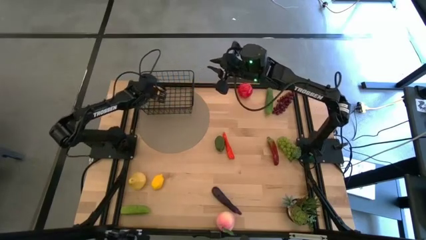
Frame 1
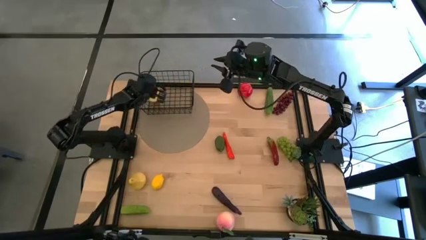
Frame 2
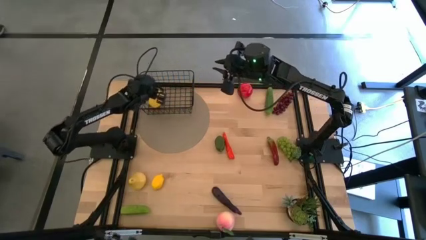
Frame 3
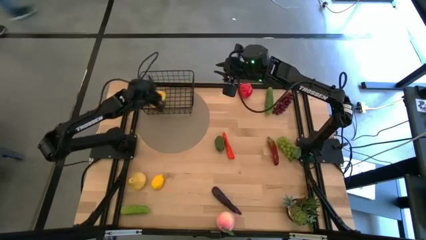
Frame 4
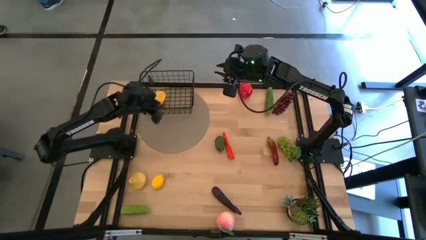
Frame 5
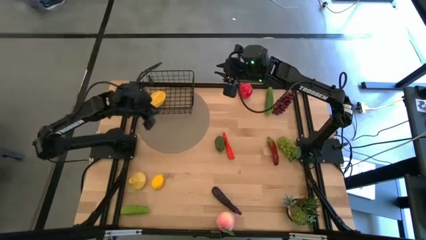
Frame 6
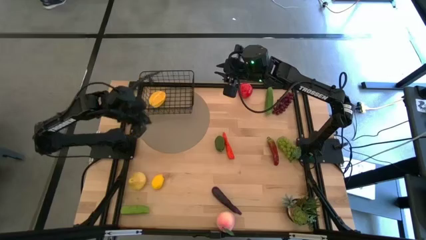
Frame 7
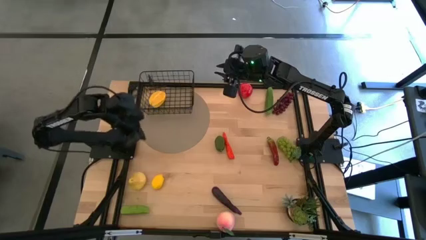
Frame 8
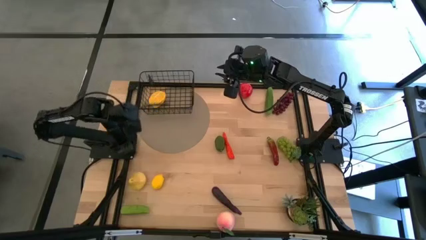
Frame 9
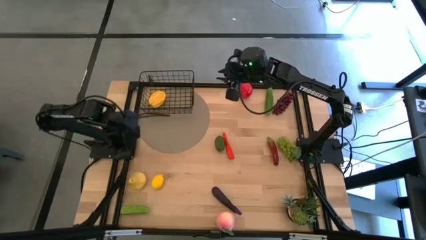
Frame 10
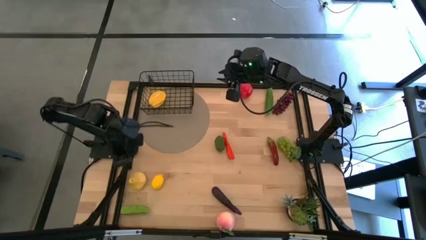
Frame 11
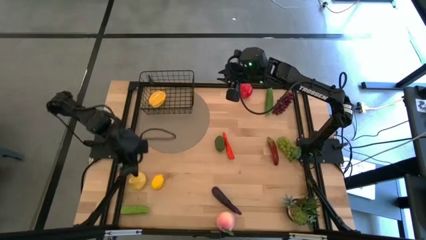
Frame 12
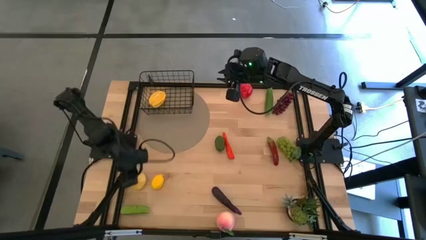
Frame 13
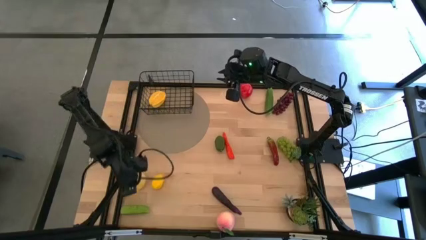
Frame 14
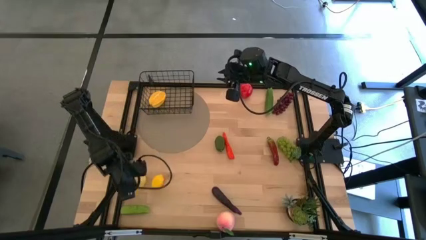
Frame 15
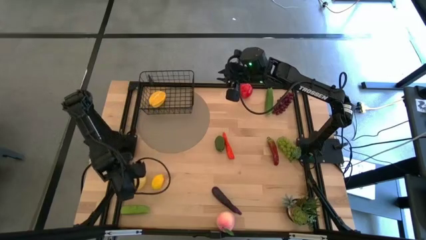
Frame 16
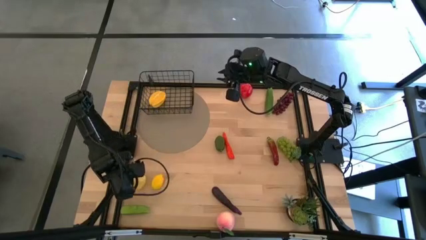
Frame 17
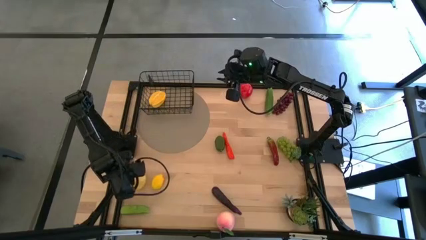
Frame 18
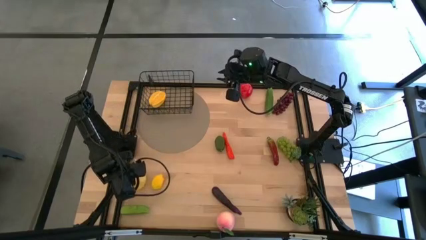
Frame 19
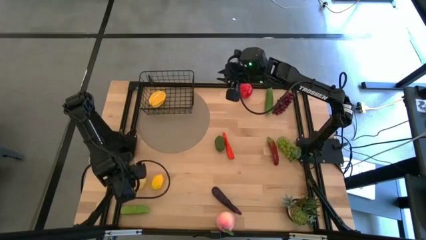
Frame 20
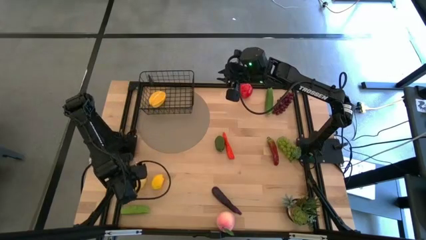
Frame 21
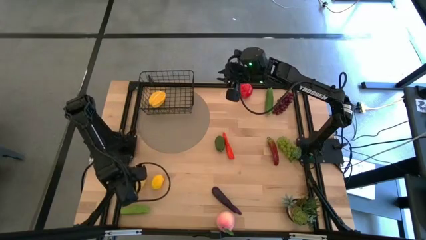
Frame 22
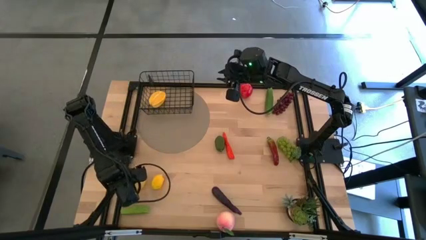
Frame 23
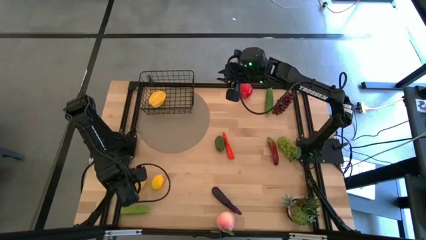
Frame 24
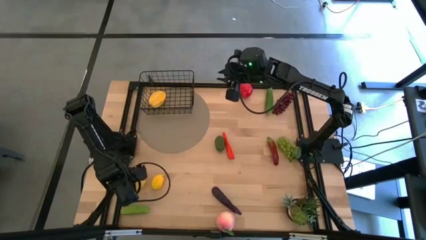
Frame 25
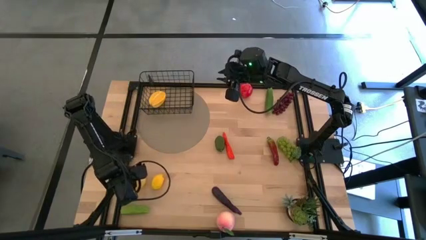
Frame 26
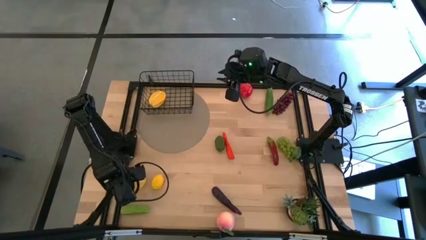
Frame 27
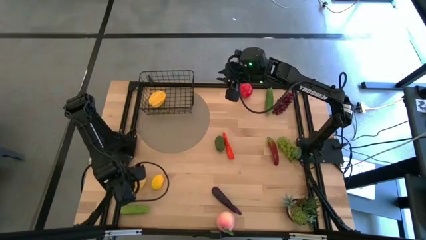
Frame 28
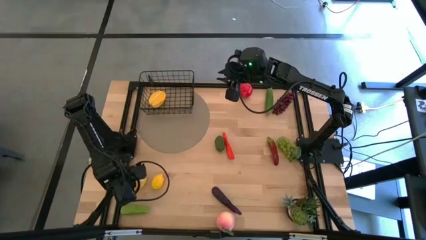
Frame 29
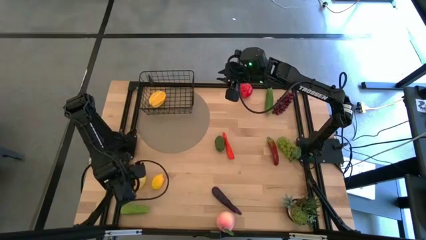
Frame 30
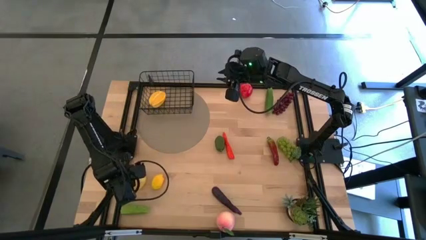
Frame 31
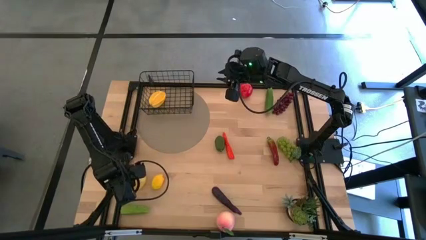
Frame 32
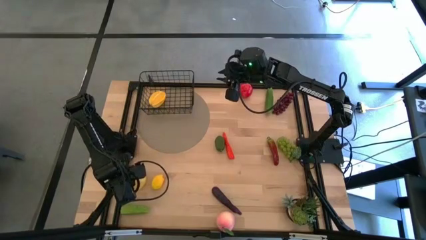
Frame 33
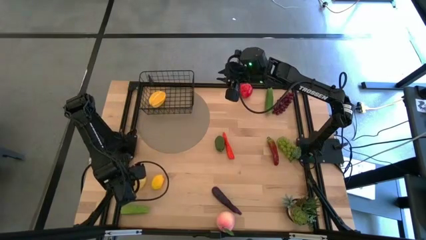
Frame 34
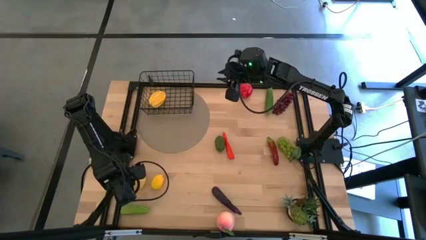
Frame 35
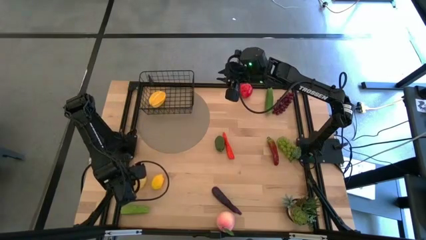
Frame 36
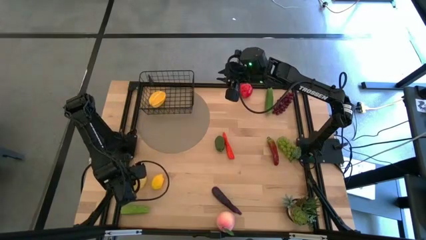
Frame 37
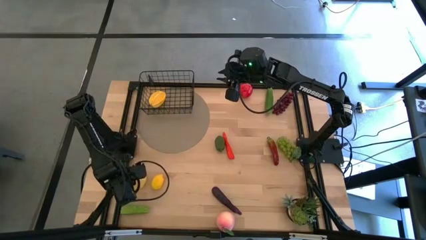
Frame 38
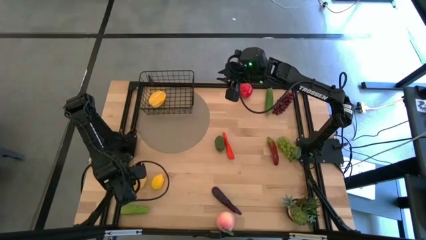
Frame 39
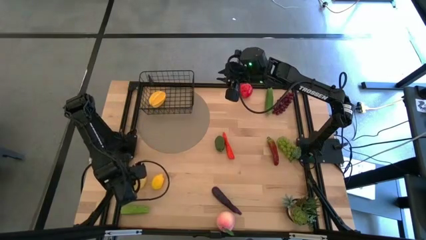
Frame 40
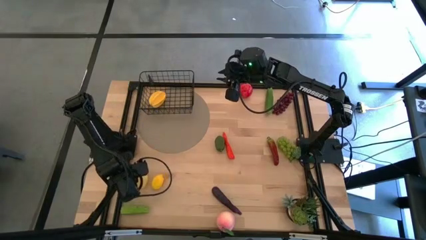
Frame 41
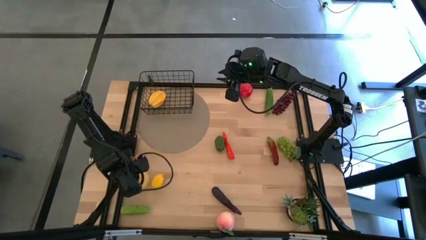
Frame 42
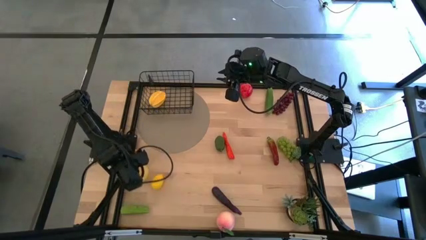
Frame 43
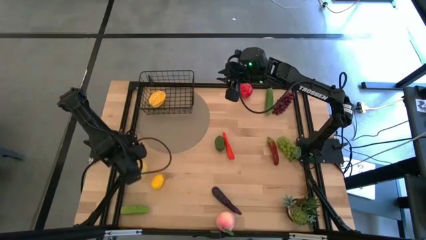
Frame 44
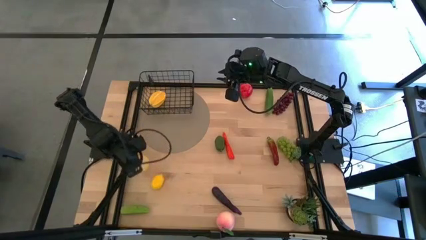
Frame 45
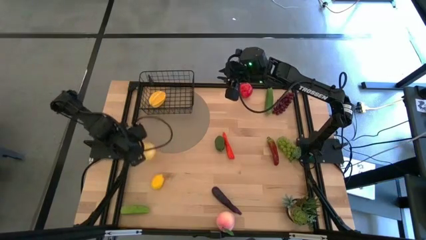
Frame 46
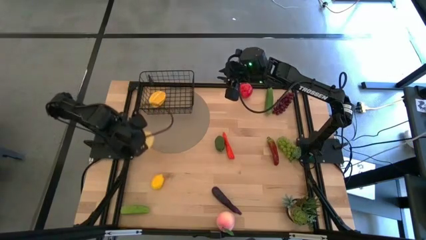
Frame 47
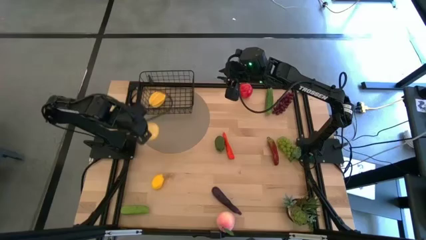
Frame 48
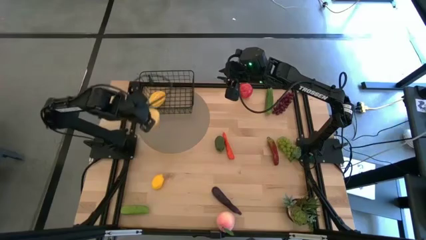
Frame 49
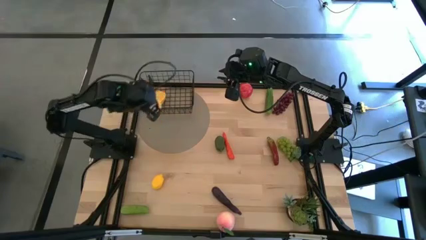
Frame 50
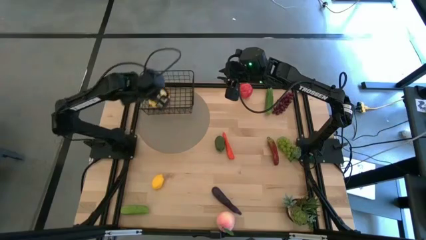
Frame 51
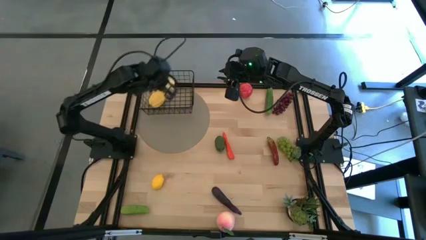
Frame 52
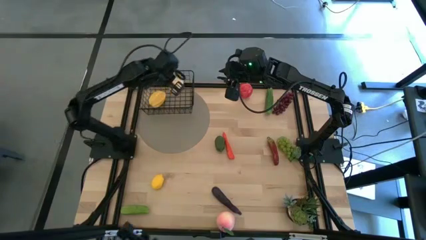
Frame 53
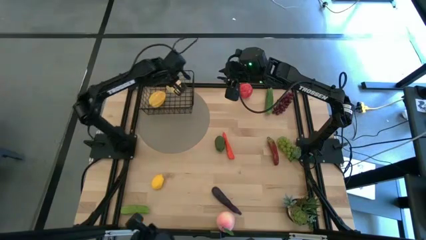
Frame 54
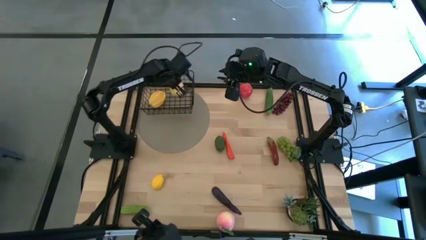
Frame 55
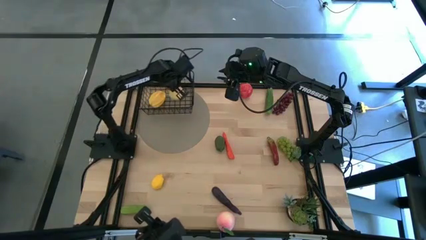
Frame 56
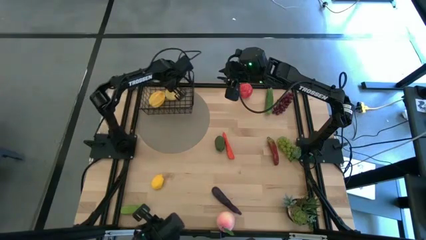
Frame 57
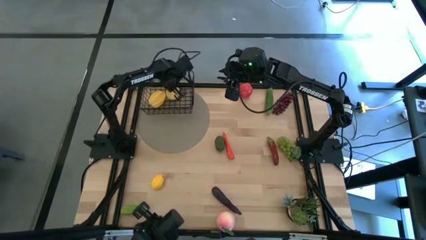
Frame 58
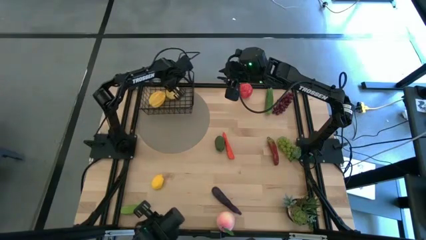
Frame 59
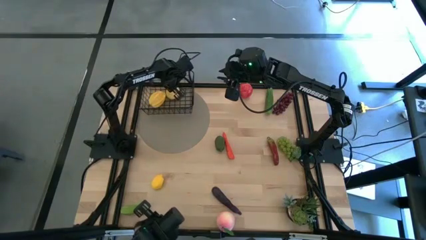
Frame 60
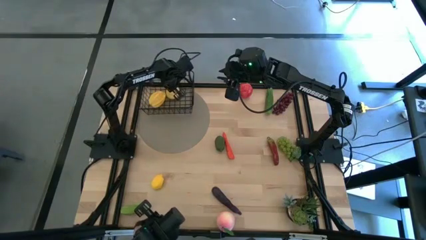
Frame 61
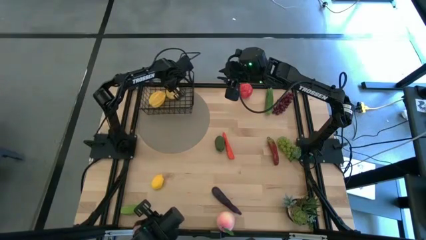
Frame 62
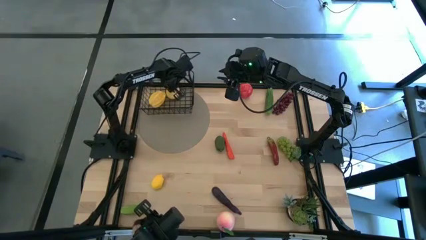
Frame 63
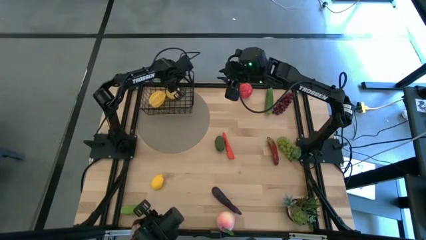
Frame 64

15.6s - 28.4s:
Task: Build produce basket
Put the yellow pear into the black wire basket

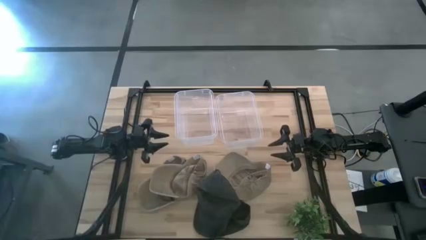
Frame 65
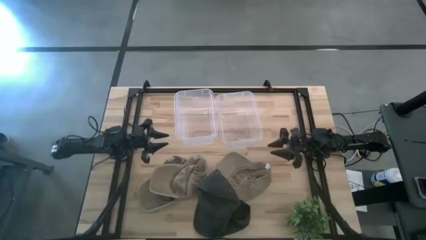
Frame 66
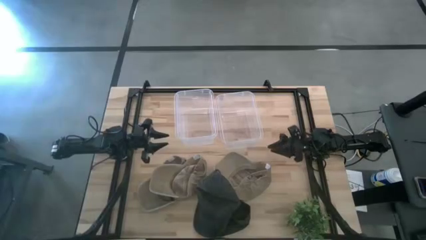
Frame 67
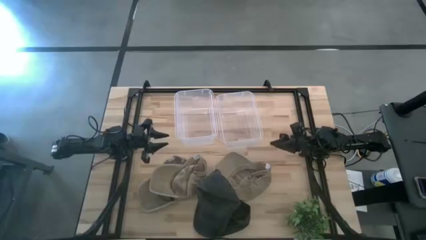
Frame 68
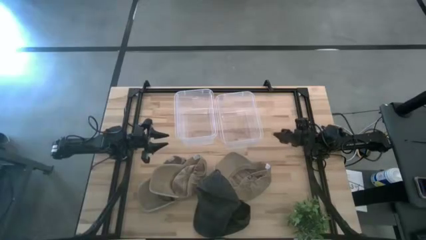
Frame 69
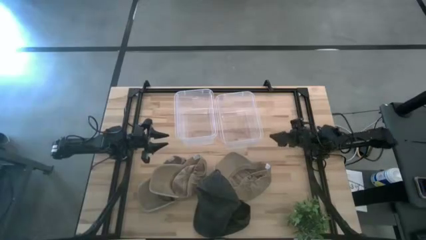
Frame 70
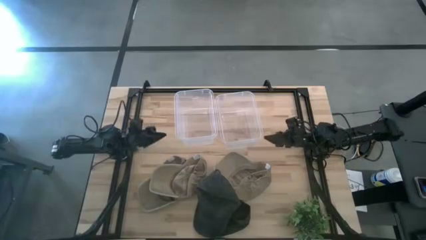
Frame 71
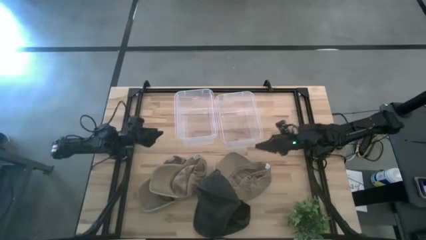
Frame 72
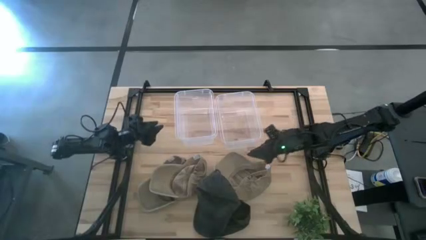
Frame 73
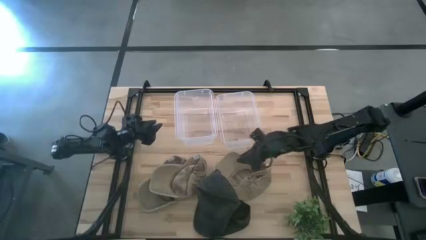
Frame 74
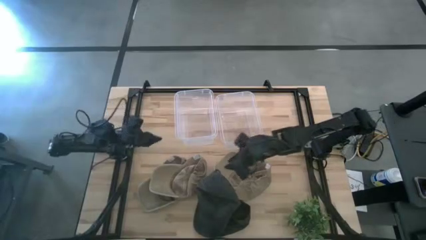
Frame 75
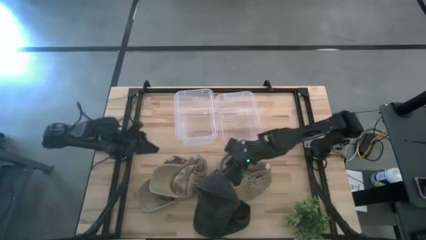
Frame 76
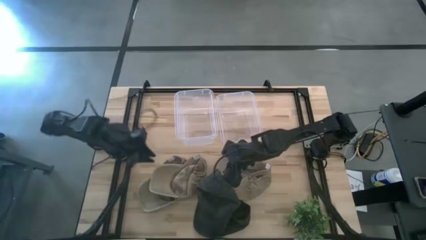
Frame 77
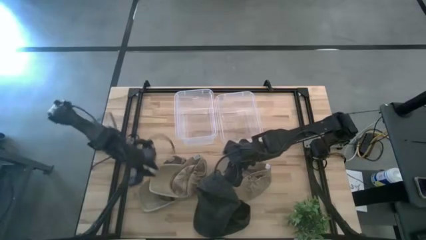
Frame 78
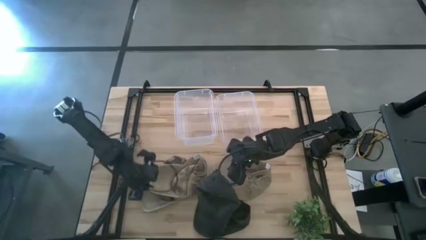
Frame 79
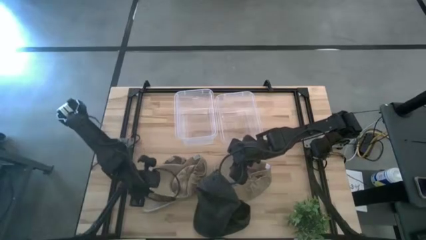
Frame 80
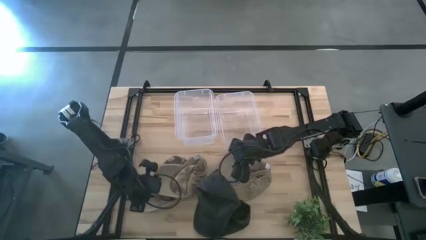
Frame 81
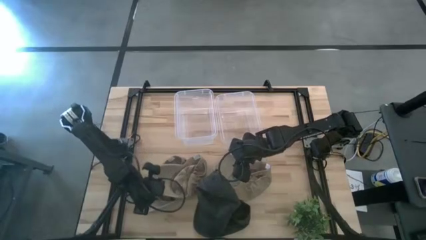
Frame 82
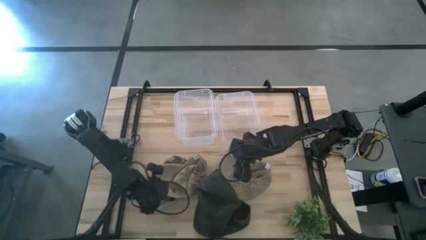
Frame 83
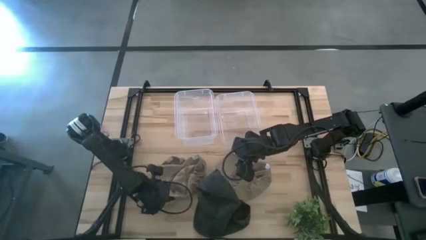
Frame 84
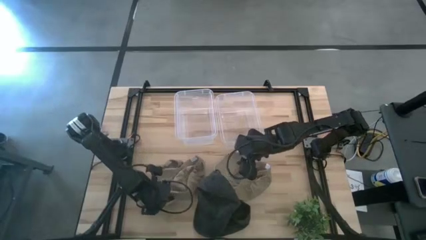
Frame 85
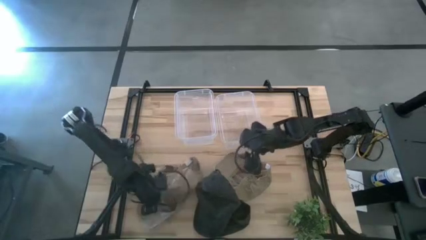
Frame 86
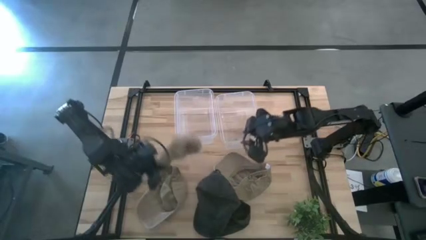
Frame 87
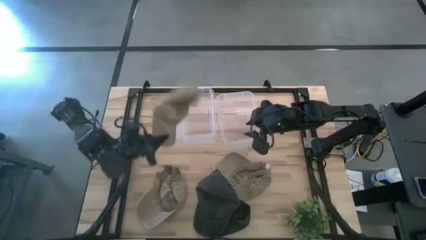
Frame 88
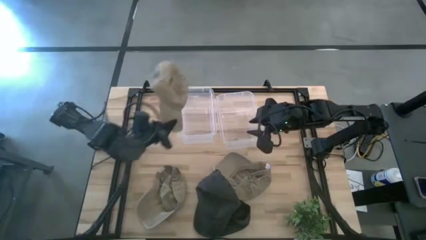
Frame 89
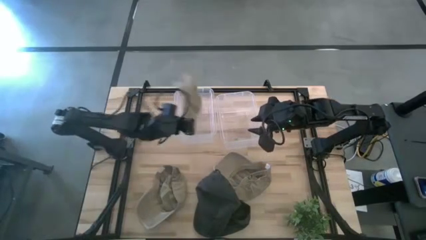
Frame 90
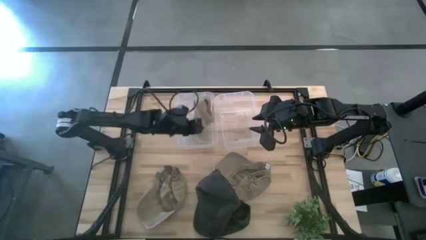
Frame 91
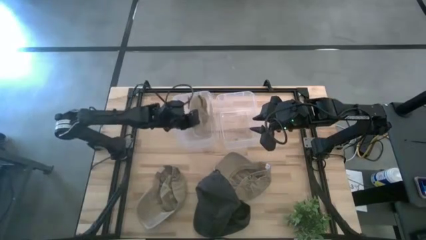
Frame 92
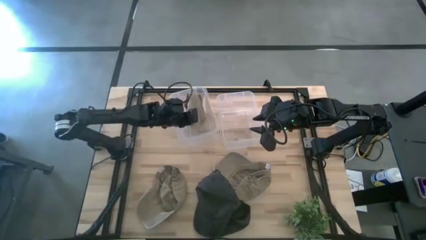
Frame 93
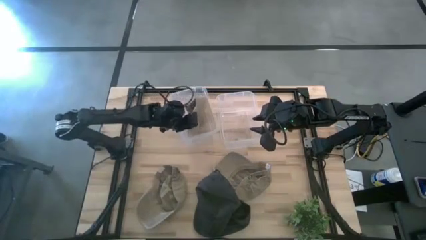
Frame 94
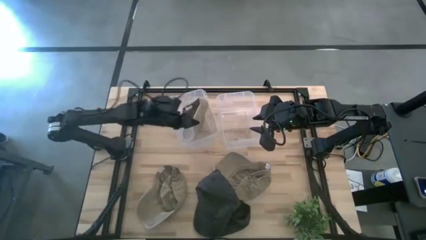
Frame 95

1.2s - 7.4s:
Task: Pick & Place hat
Put the top left brown cap into the left transparent bin
